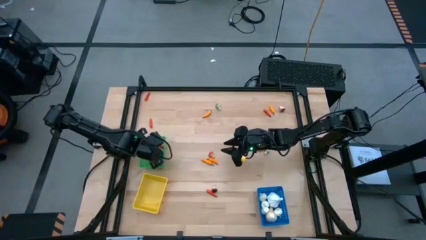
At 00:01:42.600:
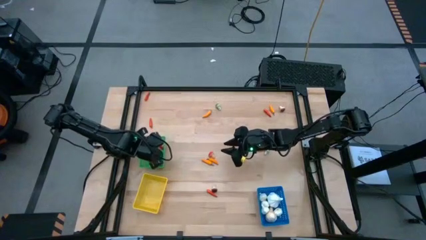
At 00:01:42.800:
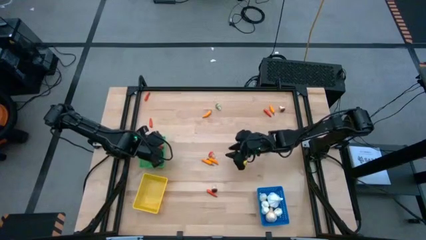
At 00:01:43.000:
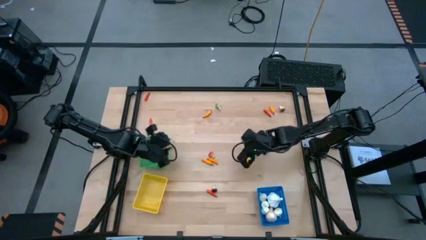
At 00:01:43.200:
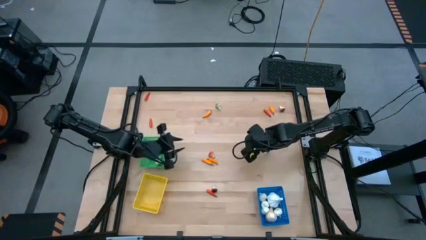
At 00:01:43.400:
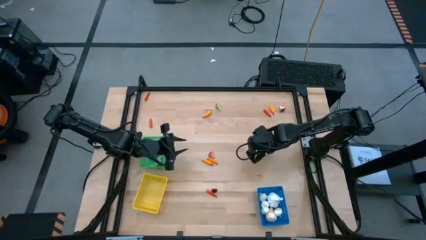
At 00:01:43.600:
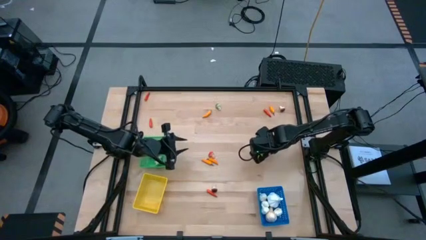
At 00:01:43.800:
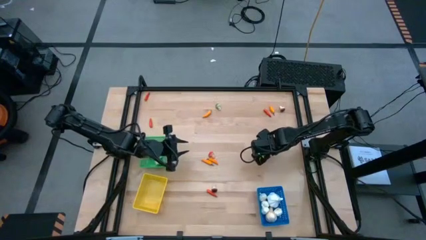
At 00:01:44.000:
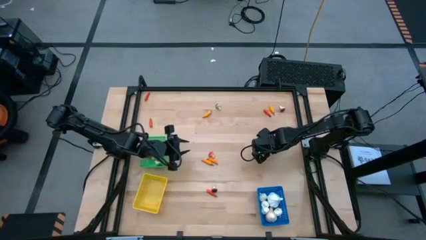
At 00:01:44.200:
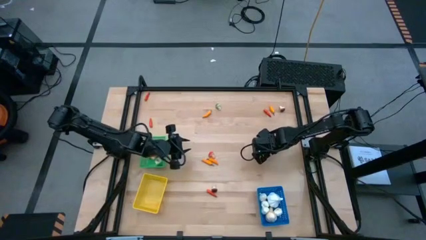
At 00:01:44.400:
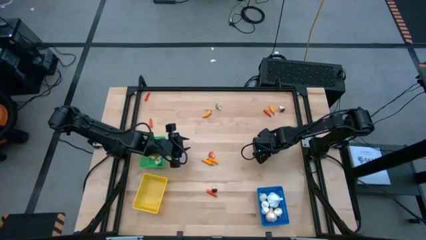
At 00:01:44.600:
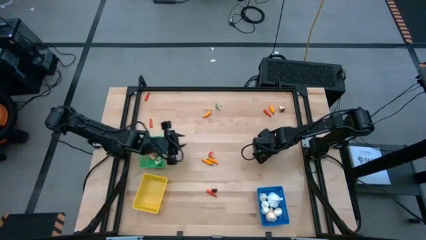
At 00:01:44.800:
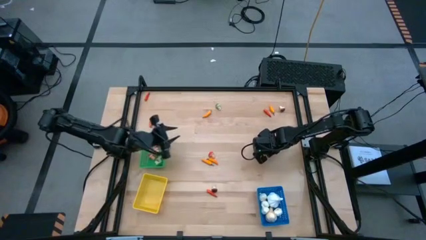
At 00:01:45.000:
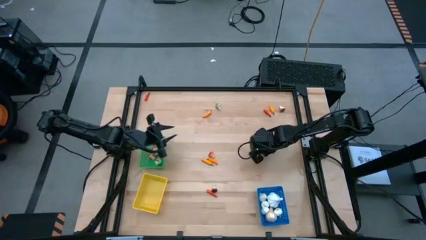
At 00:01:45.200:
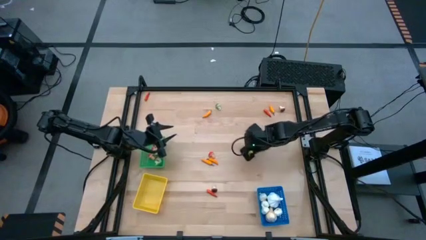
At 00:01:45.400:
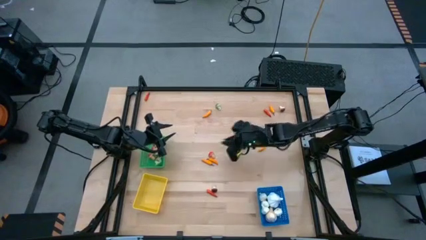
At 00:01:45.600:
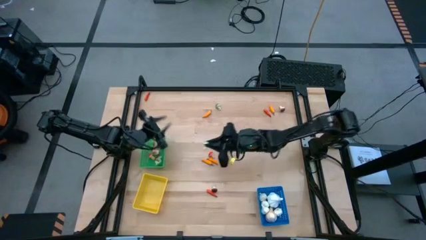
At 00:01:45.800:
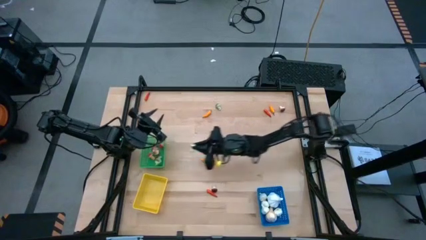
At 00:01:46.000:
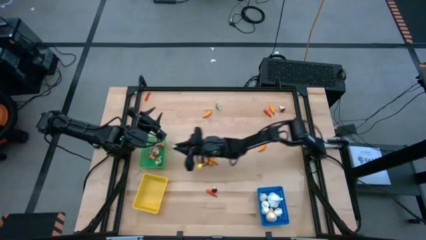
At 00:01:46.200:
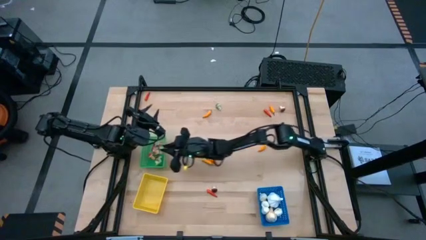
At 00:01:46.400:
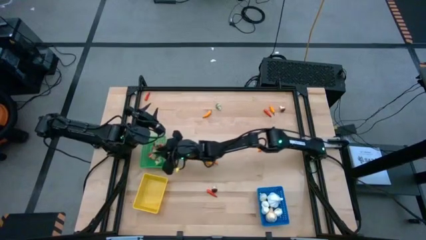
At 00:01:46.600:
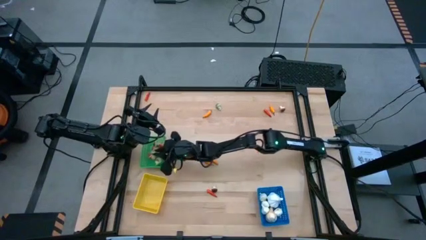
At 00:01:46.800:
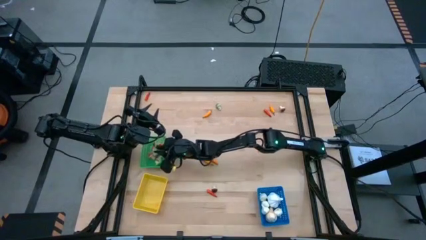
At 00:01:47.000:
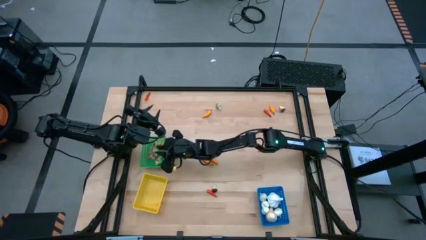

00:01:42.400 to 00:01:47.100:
Task: Sort produce into baskets
Put the green mushroom into the green bin

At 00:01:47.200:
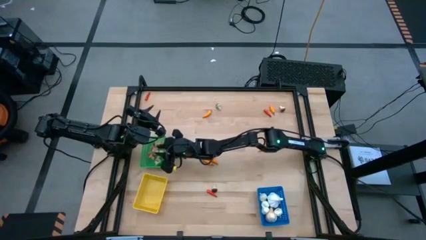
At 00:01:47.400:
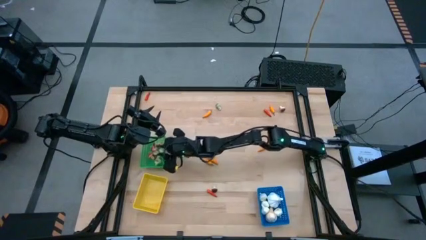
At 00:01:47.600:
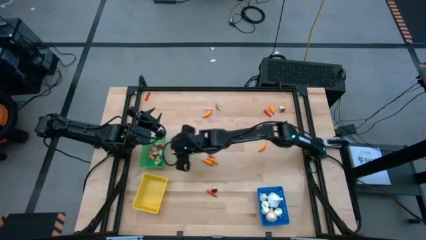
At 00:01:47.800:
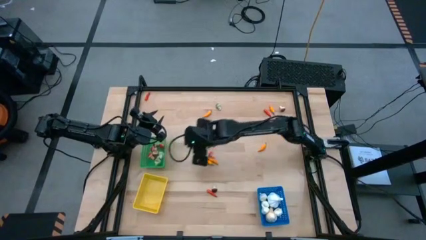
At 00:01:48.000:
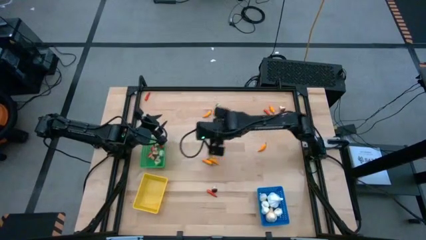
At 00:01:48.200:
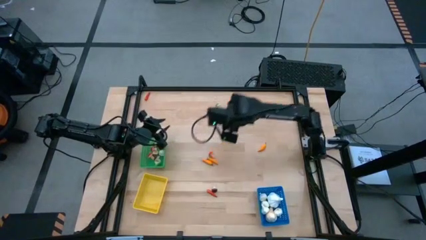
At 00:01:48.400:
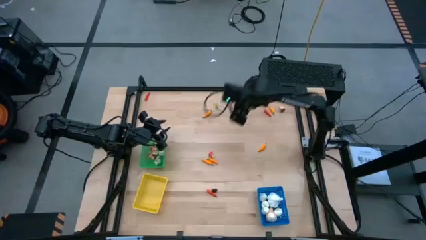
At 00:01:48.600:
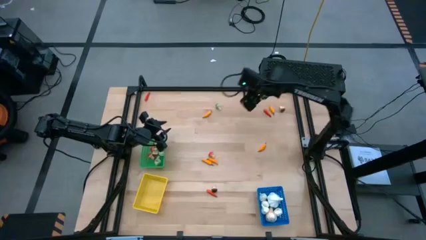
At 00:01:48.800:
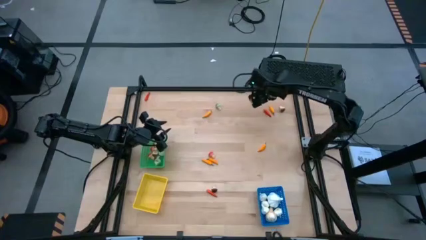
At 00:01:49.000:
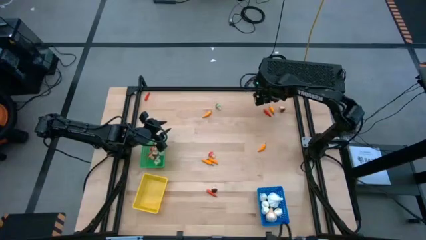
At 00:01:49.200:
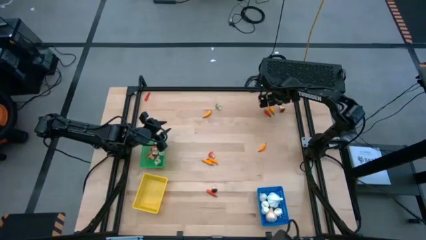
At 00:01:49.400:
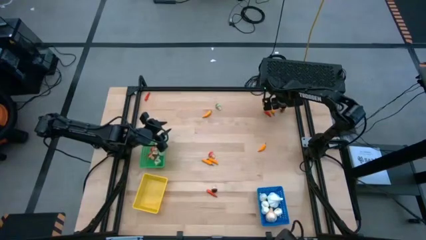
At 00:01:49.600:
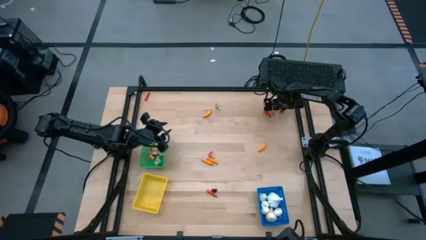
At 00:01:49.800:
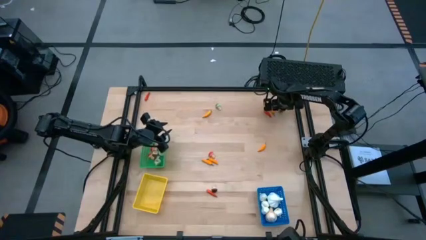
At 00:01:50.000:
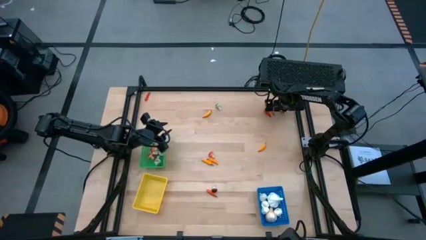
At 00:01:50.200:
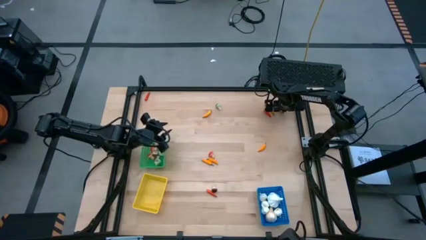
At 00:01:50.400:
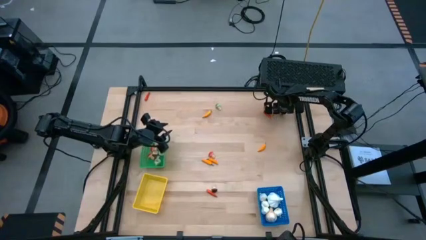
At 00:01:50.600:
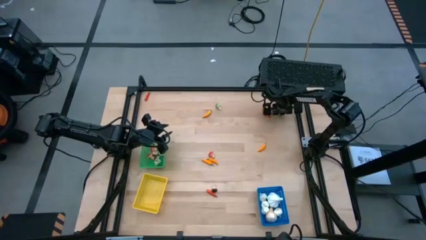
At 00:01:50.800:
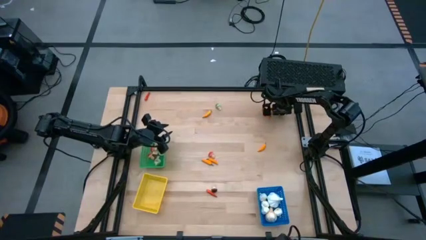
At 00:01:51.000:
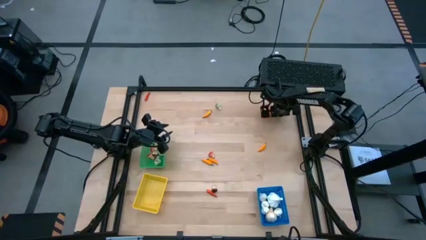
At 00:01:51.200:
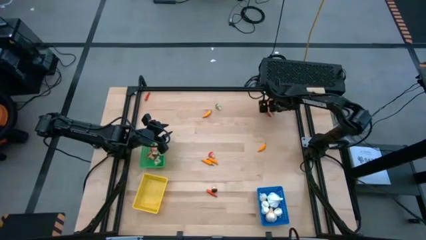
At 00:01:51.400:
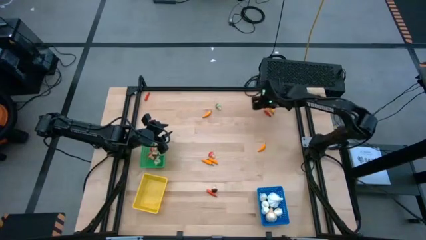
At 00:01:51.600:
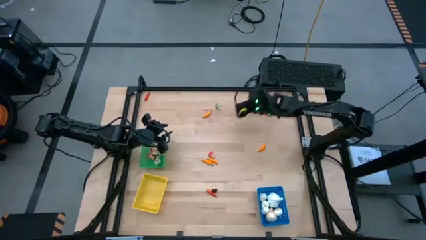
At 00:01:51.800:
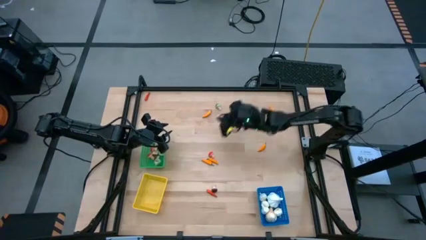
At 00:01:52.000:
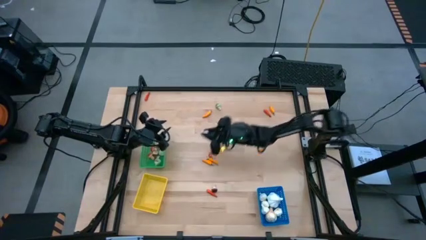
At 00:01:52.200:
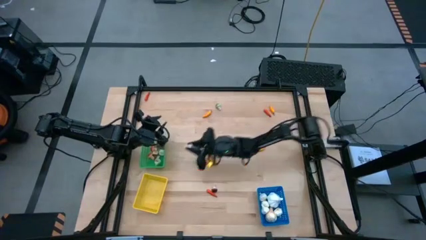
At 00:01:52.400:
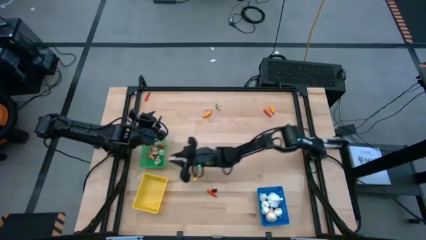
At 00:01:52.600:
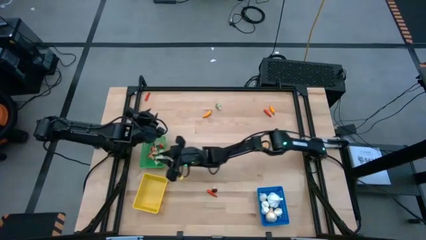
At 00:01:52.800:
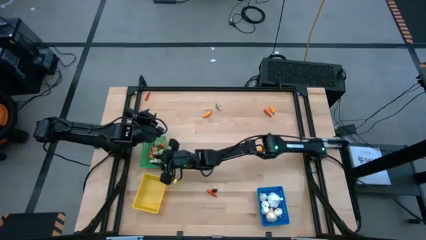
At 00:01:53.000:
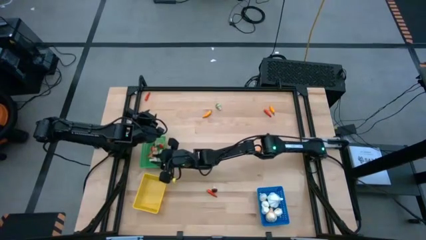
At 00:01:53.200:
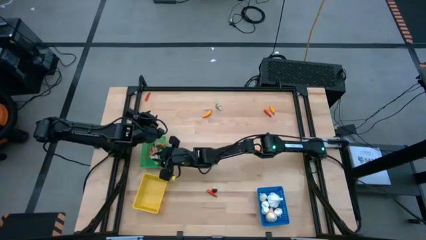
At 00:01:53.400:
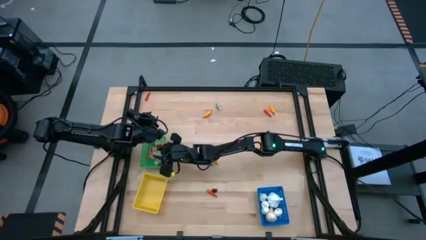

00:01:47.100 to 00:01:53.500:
Put the brown mushroom into the green bin

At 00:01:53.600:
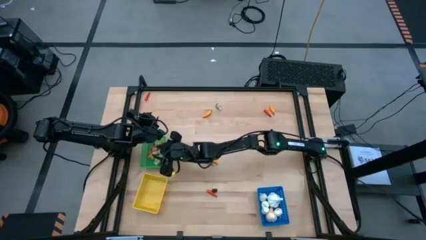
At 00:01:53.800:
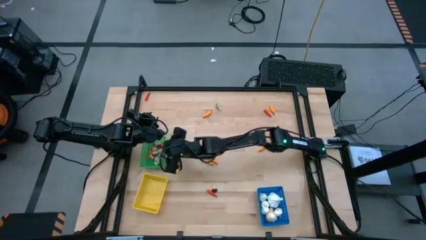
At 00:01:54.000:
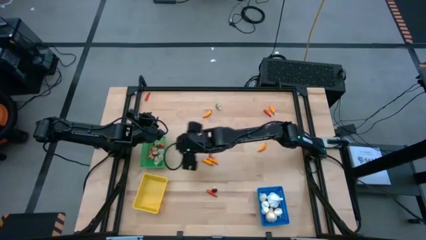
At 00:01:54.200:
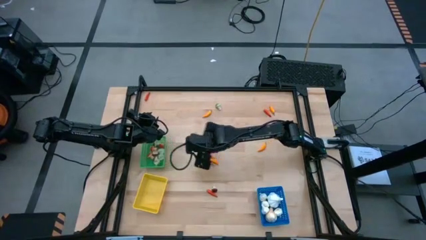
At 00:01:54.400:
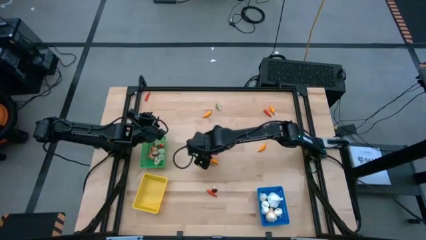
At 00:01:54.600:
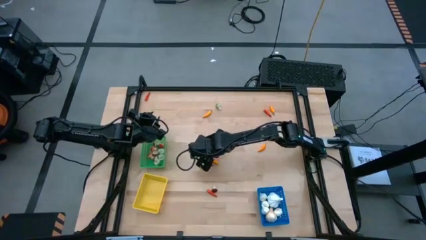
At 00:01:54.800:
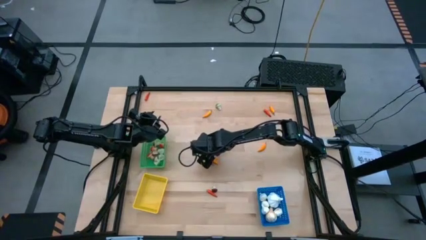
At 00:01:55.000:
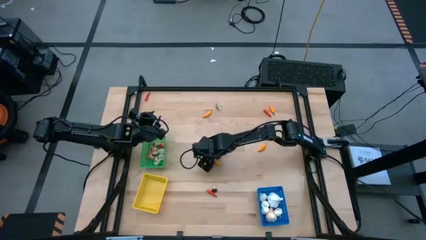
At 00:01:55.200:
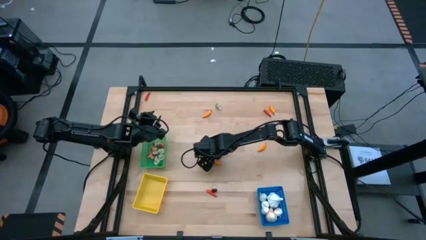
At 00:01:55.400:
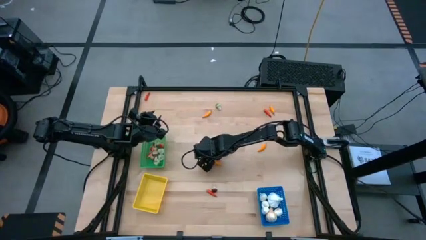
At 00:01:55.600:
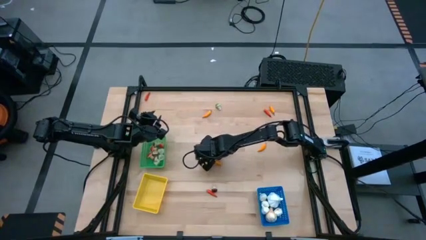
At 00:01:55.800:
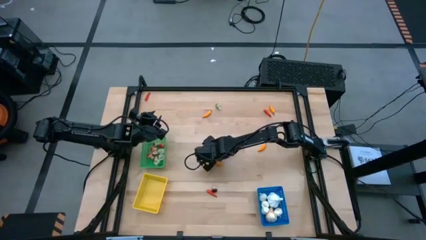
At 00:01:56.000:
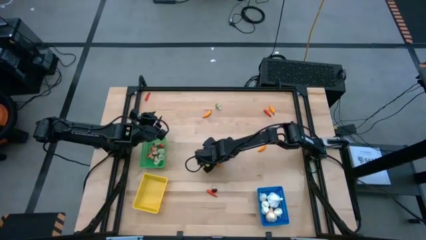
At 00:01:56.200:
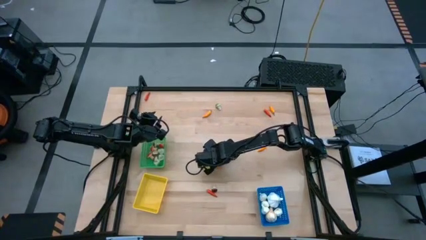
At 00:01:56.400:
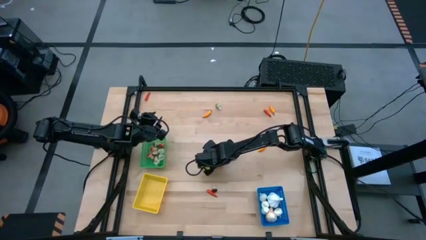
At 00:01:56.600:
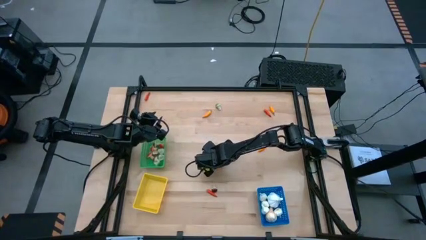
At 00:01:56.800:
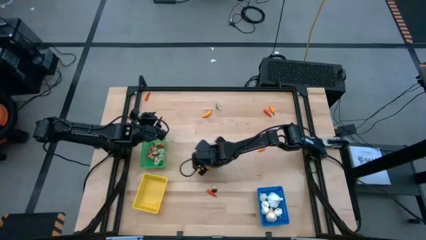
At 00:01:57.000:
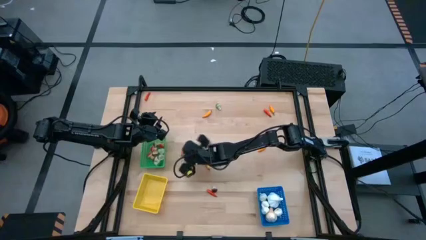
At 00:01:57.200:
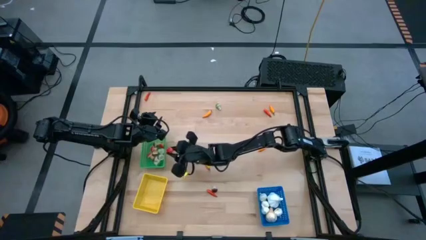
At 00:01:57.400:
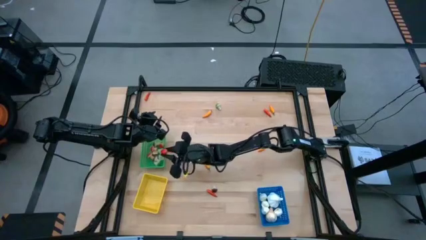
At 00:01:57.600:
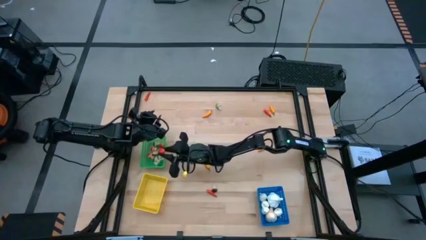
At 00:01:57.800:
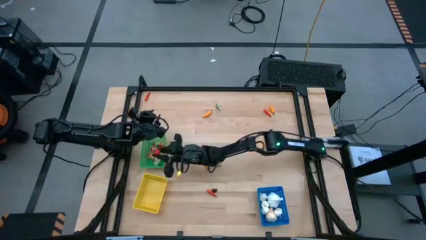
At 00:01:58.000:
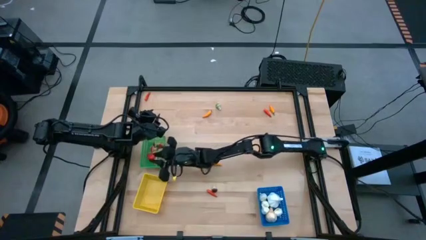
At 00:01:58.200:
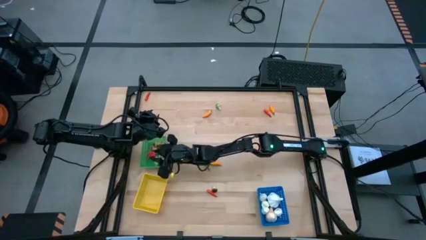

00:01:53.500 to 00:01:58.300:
Put the red mushroom into the green bin

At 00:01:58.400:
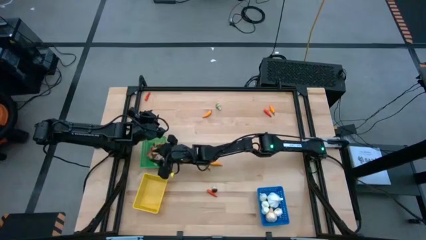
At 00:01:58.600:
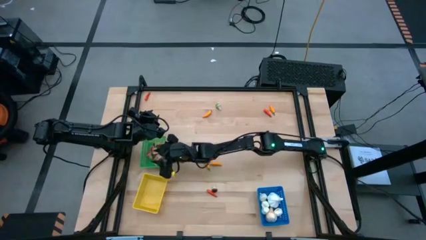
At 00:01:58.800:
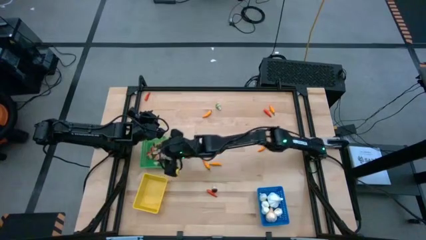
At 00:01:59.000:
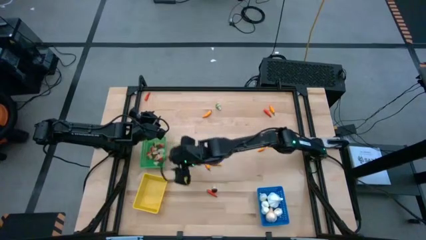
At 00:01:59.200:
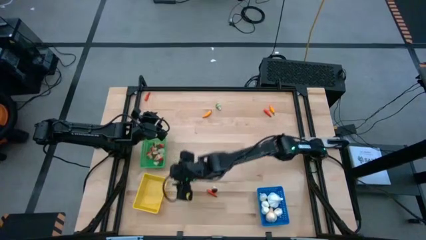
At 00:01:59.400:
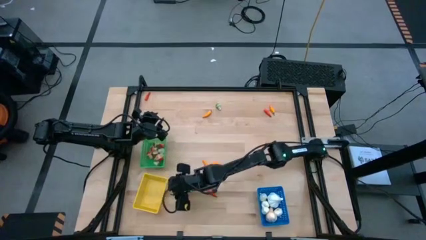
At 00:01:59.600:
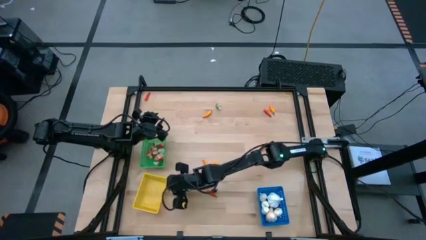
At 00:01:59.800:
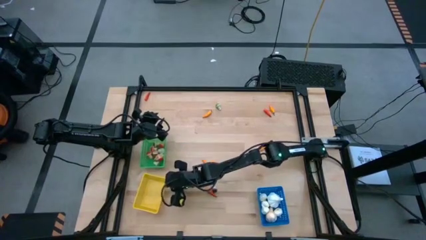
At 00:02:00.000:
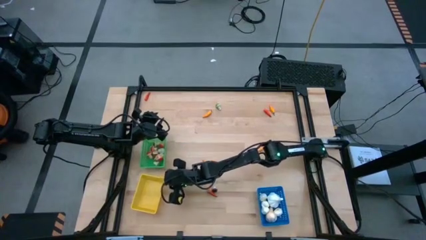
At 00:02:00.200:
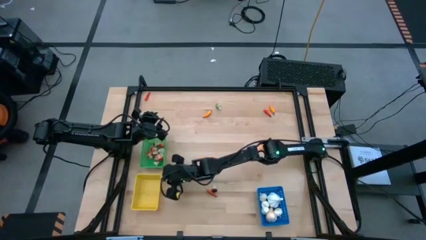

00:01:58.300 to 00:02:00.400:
Adjust the yellow bin
